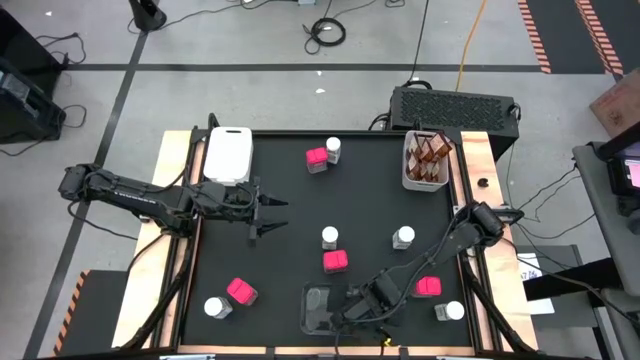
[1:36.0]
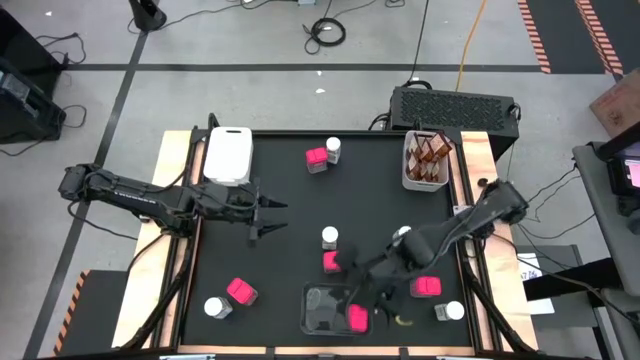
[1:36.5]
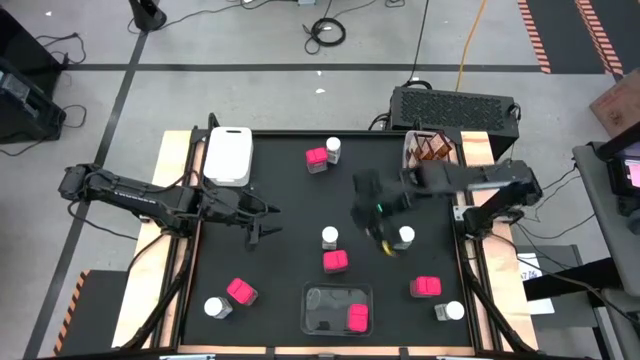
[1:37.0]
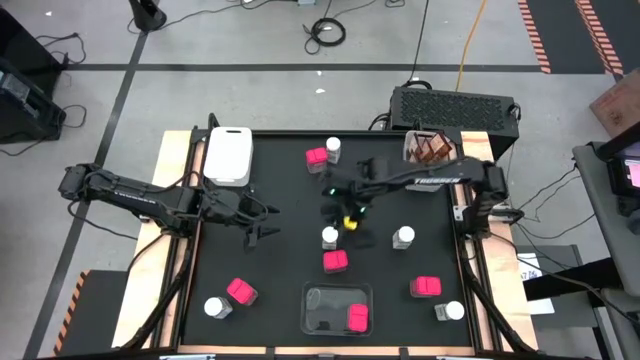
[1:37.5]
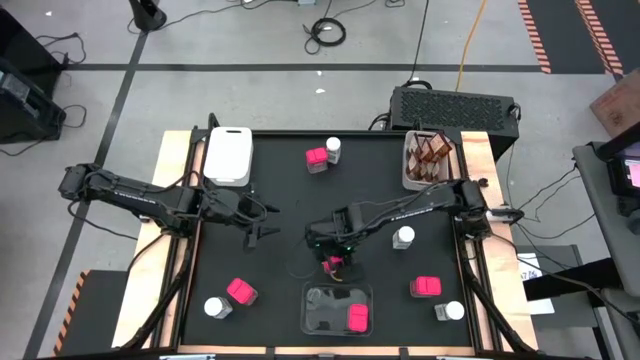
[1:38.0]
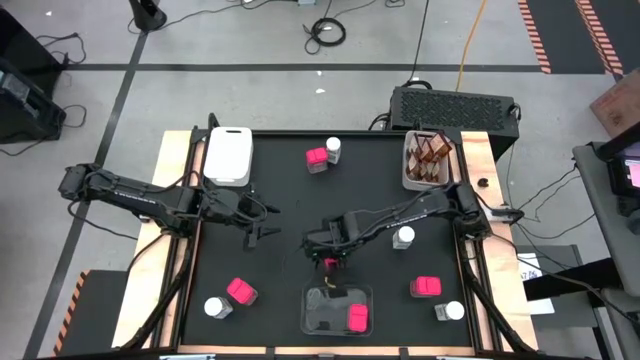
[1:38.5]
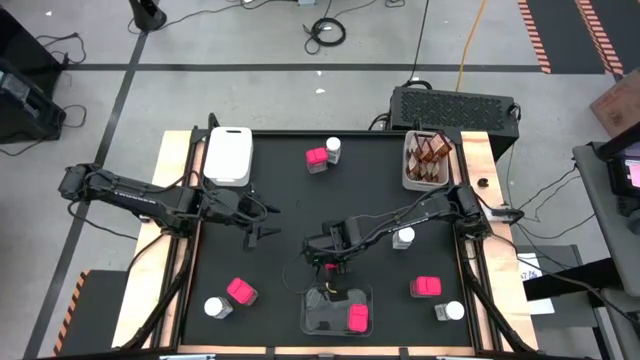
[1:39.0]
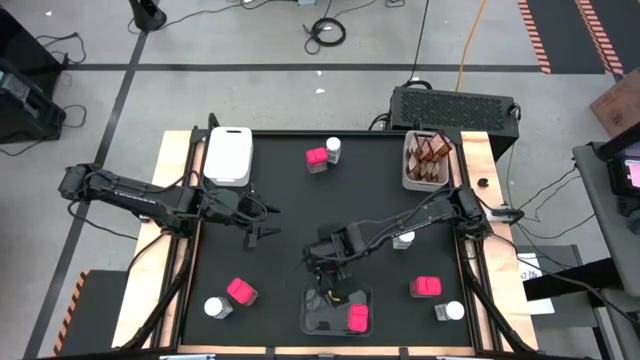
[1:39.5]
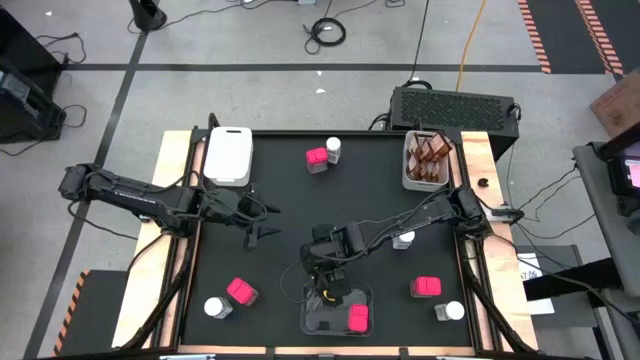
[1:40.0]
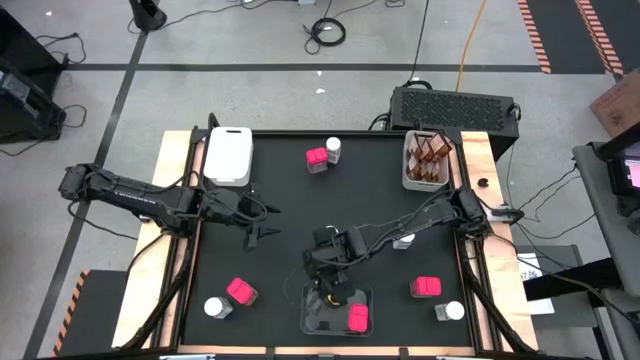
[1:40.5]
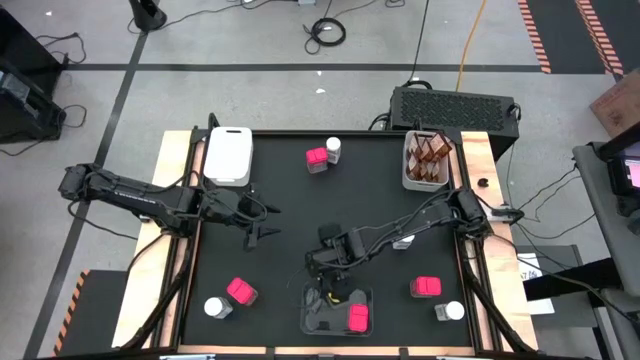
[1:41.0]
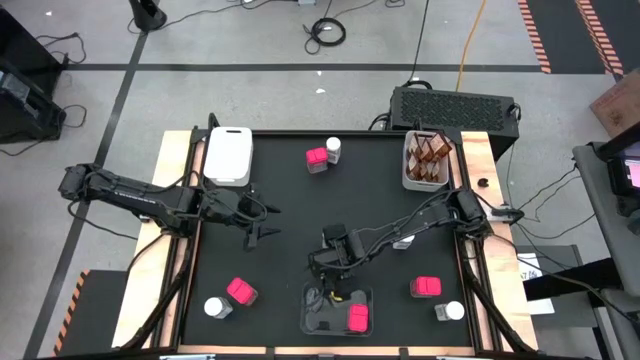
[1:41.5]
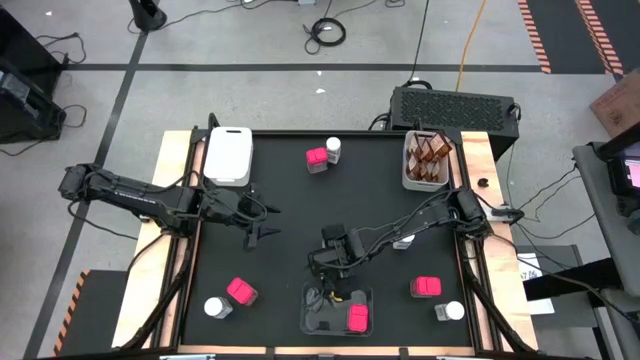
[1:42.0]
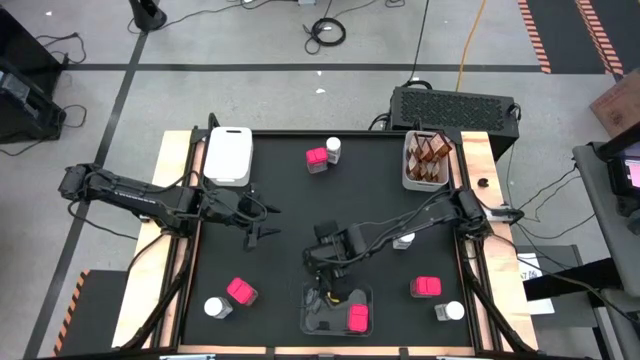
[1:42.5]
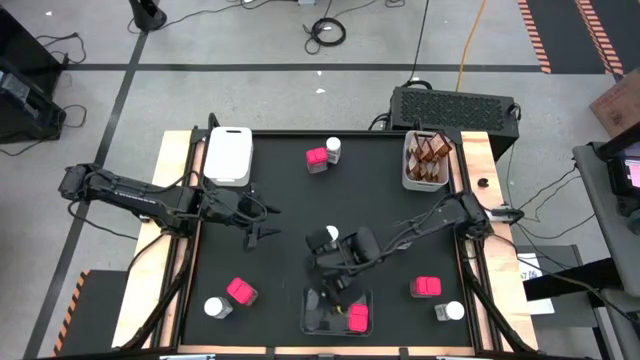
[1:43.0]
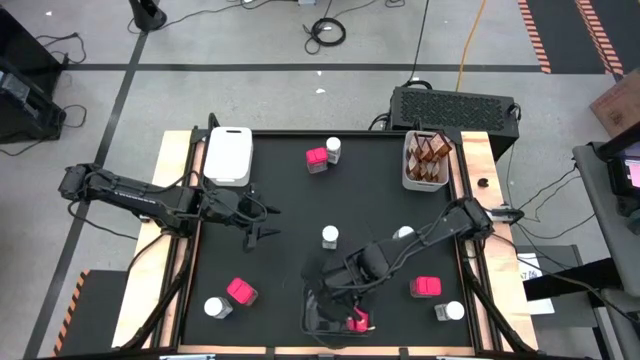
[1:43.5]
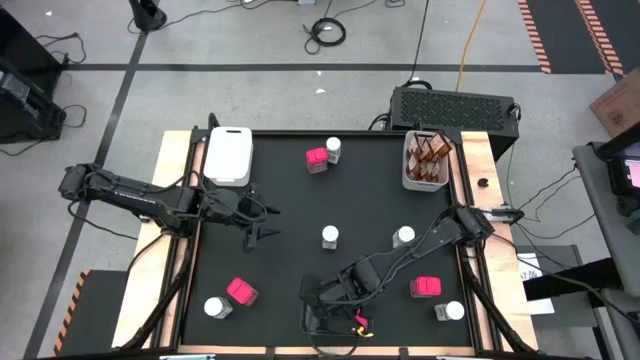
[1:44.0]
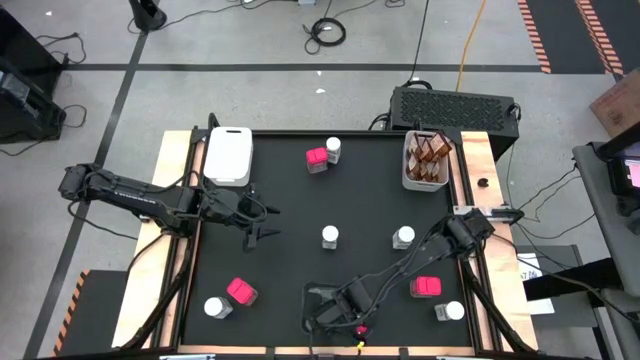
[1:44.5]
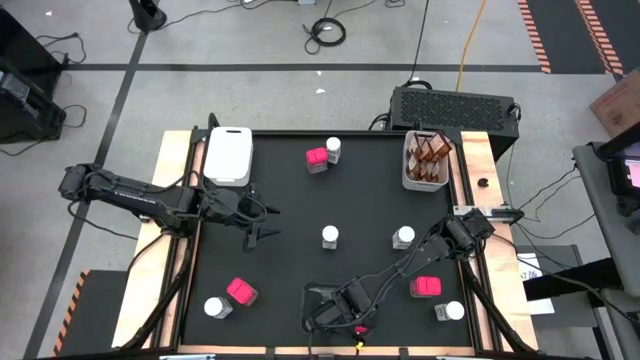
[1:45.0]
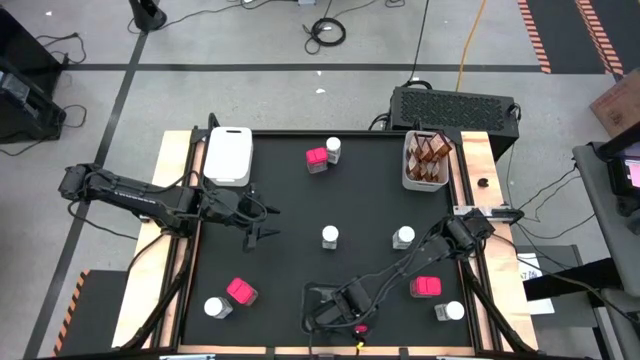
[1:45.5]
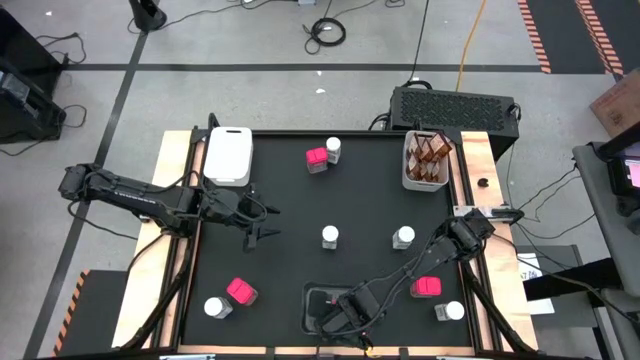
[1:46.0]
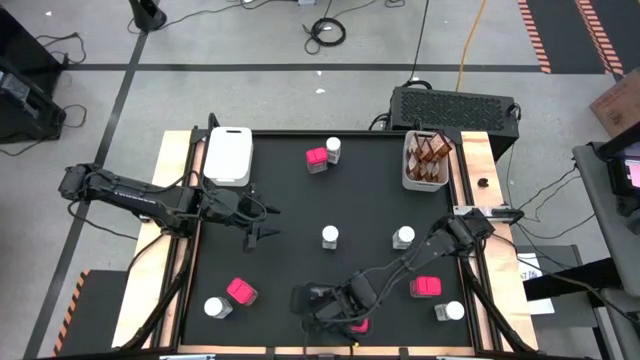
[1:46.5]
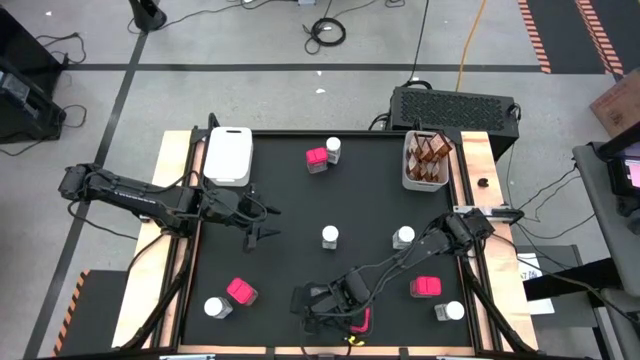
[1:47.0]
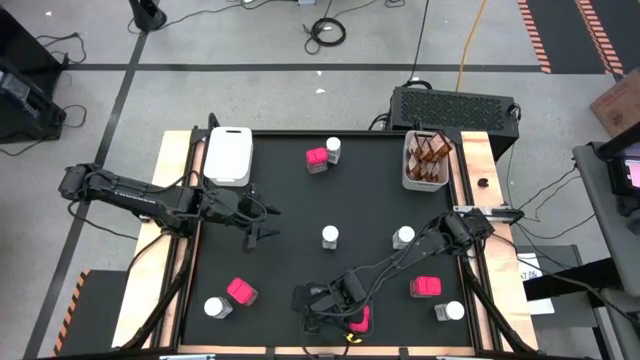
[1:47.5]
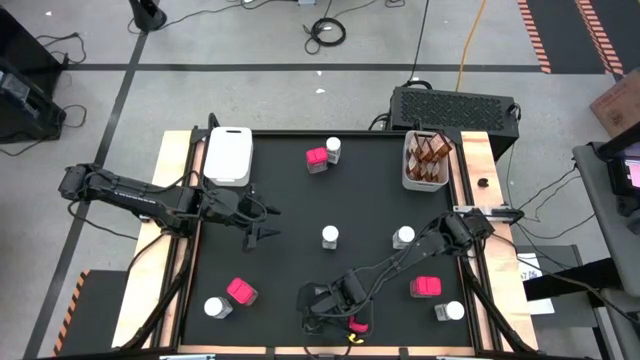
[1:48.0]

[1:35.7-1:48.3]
Task: Sort spices by type
Put the red seasoning can into the black bin

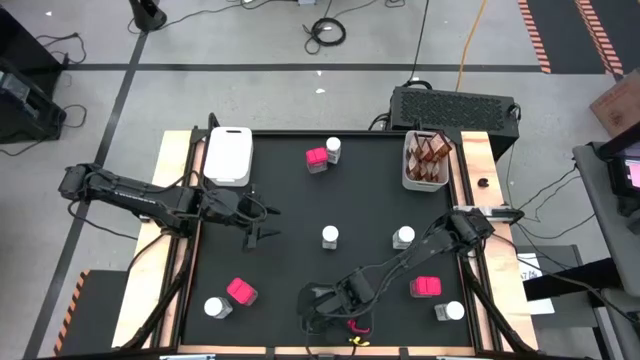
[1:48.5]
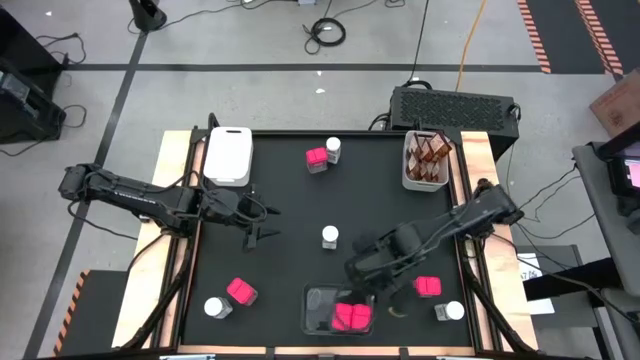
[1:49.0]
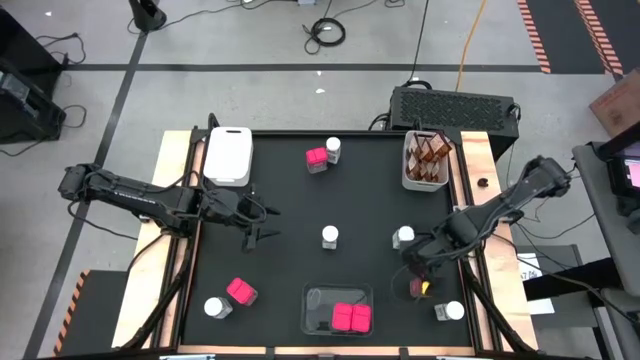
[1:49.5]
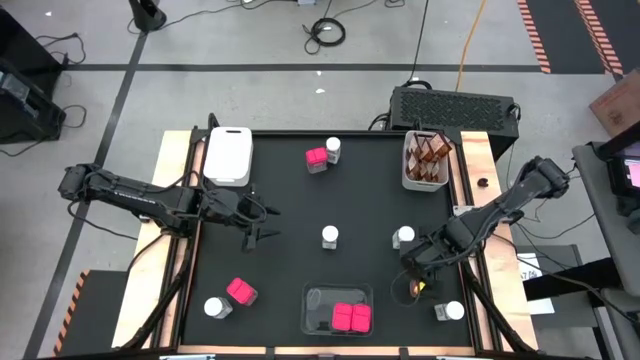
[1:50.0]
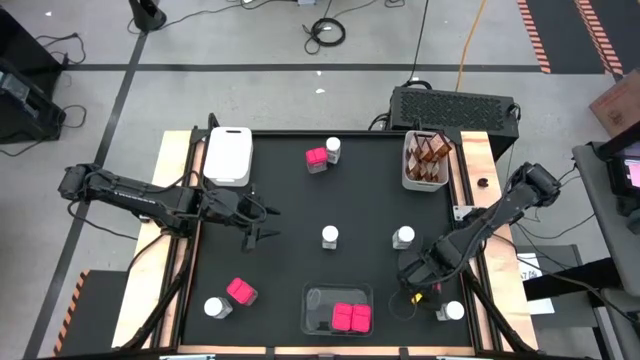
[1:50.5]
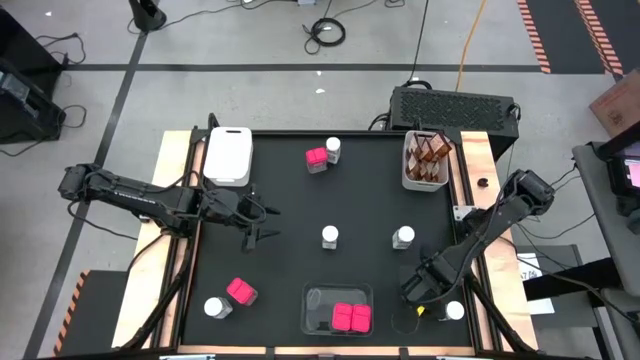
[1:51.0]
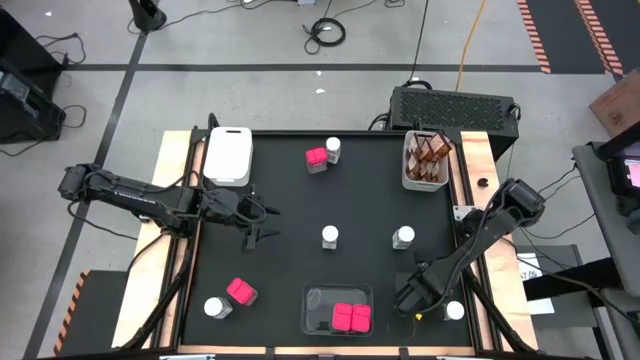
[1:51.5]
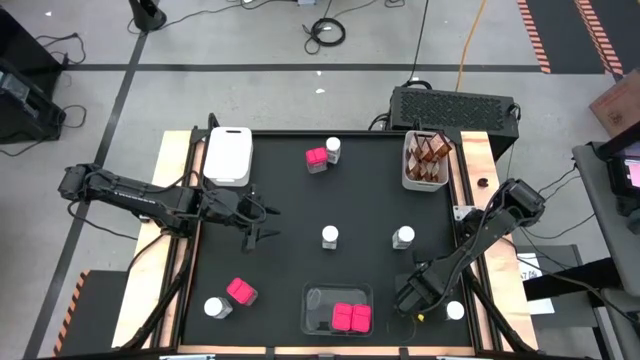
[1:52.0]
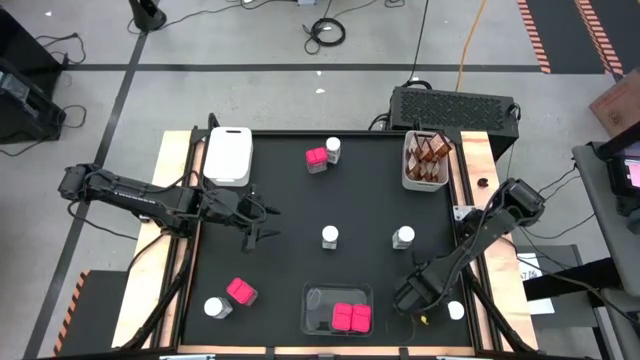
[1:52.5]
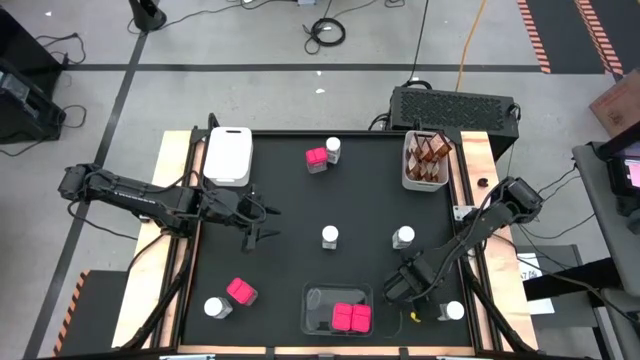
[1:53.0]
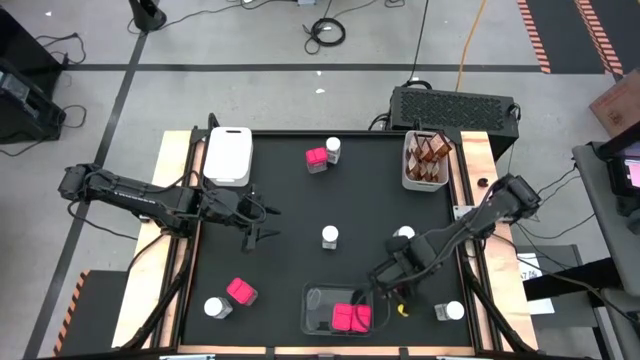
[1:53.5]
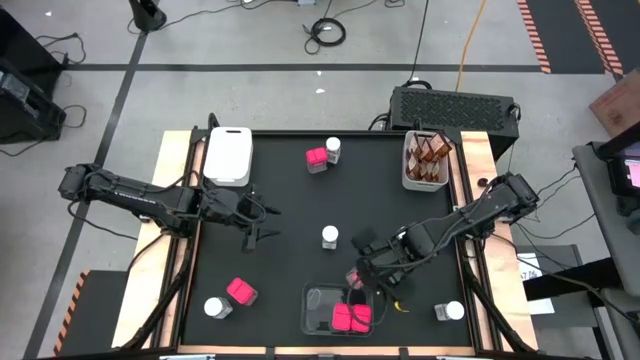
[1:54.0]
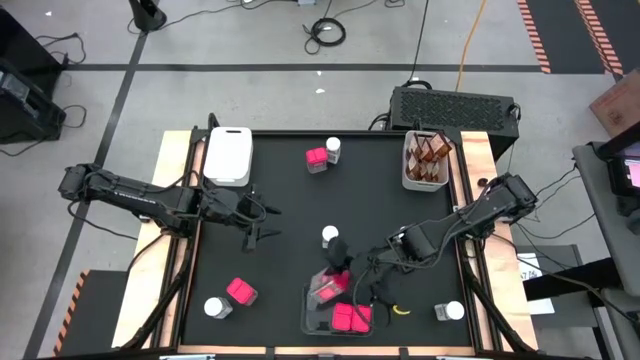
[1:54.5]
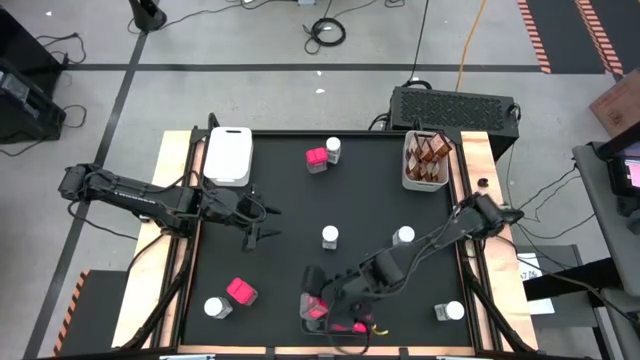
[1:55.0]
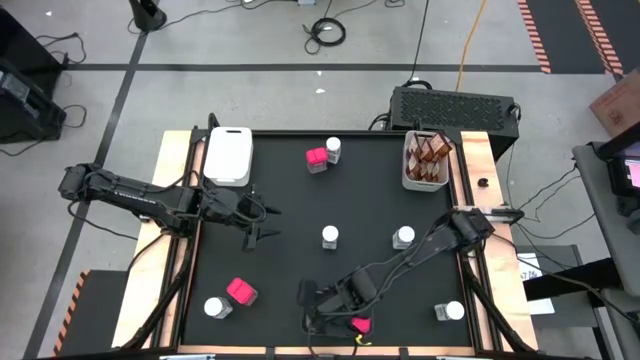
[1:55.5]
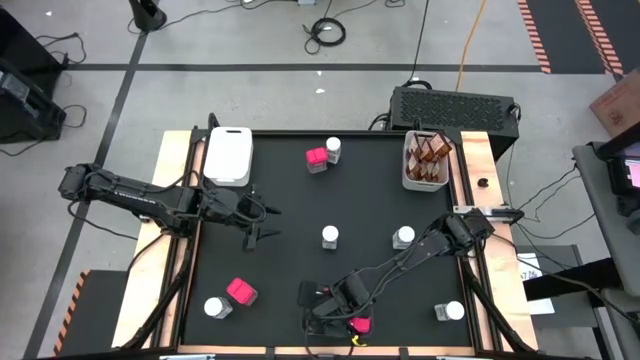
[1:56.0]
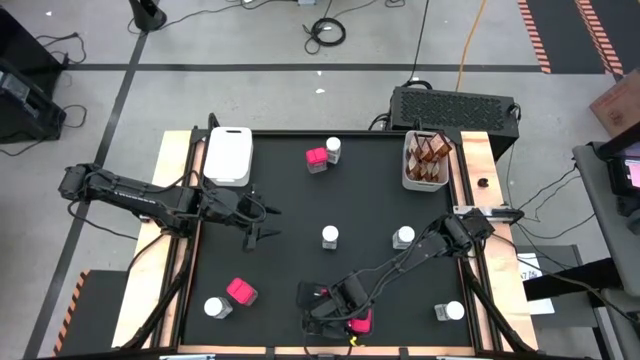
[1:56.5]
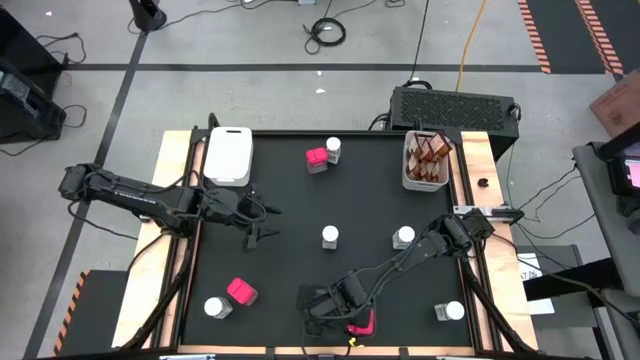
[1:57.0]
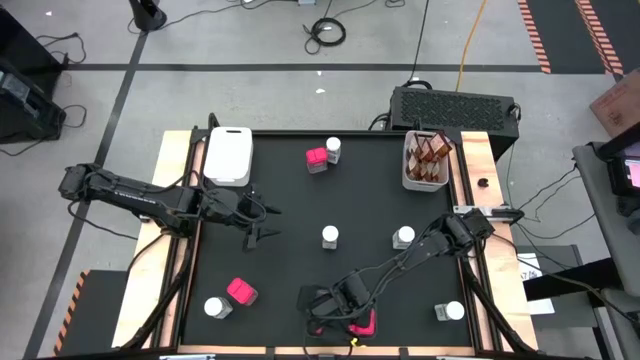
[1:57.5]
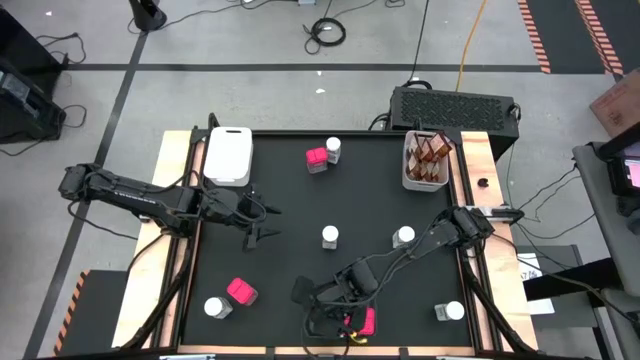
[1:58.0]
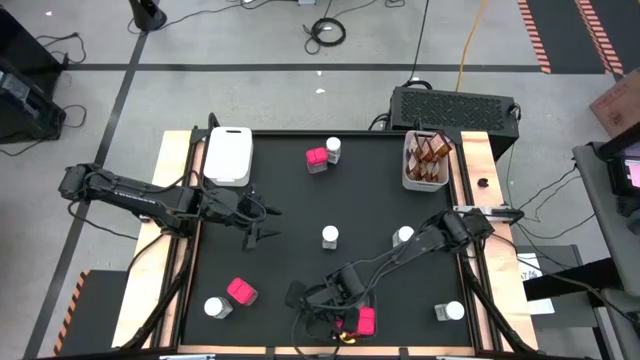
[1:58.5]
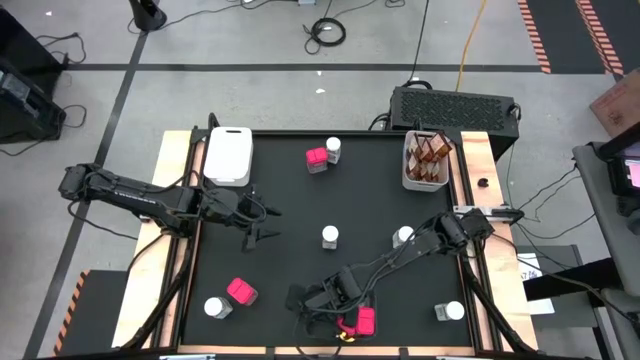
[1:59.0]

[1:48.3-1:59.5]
Put the red seasoning can into the black bin
